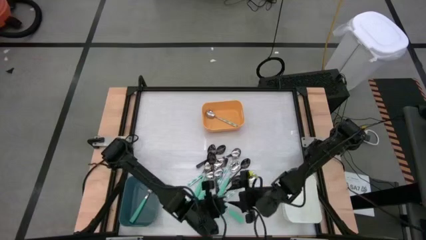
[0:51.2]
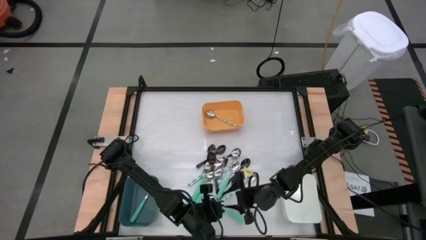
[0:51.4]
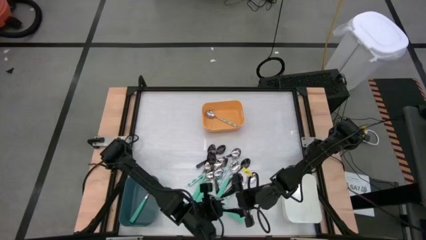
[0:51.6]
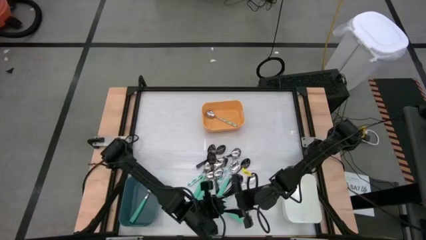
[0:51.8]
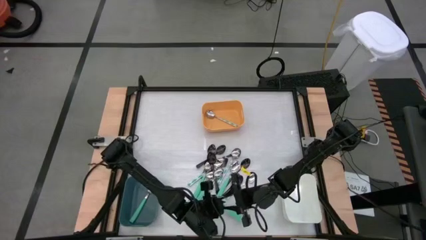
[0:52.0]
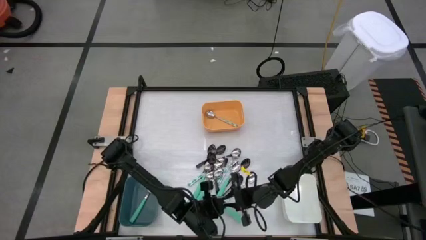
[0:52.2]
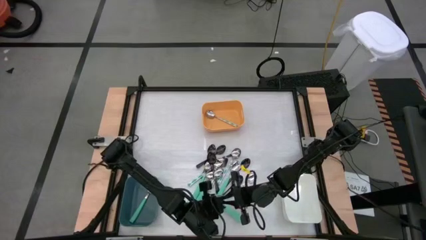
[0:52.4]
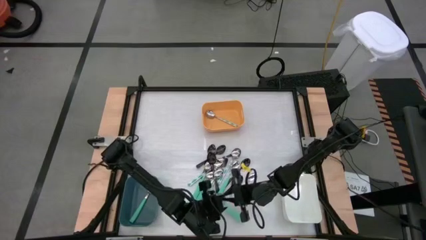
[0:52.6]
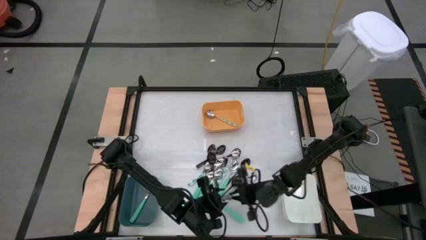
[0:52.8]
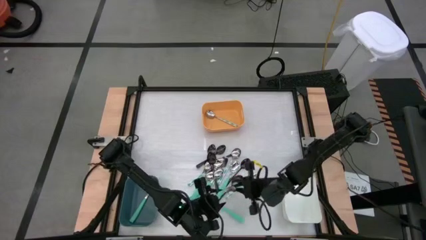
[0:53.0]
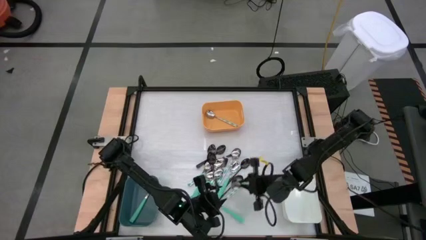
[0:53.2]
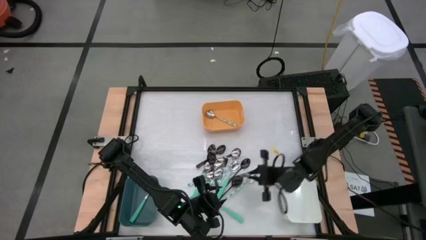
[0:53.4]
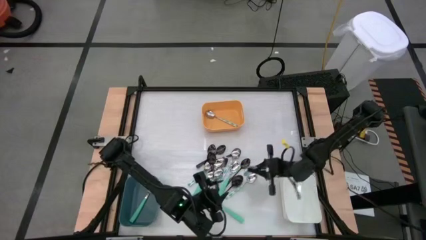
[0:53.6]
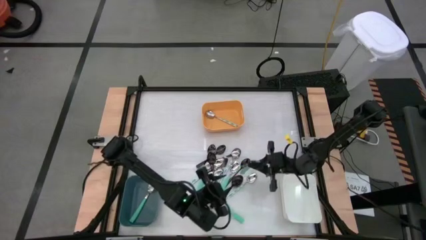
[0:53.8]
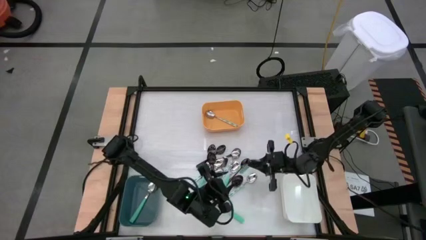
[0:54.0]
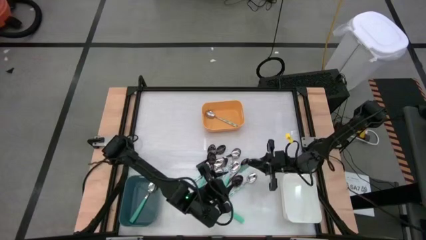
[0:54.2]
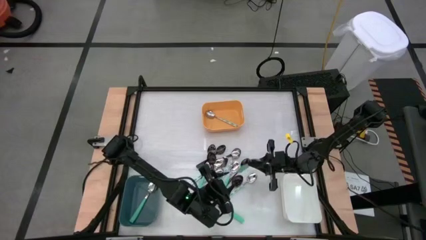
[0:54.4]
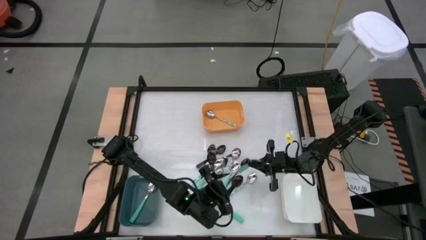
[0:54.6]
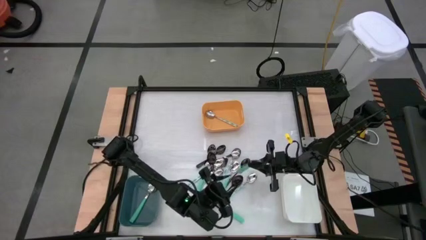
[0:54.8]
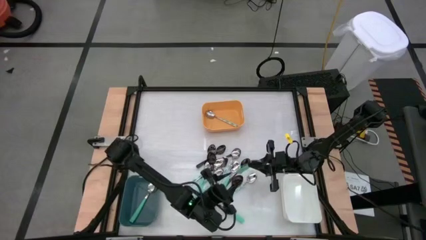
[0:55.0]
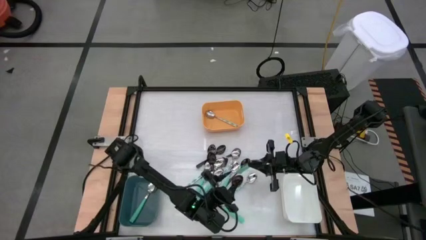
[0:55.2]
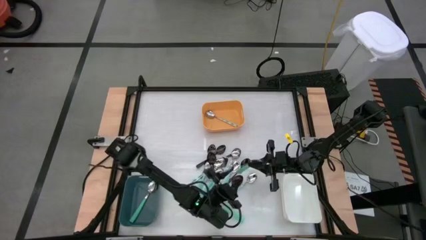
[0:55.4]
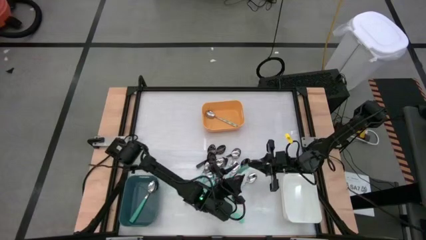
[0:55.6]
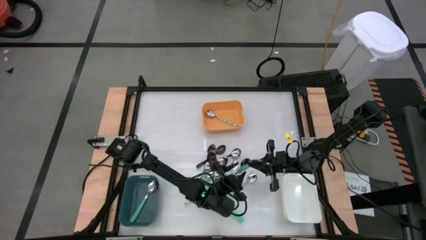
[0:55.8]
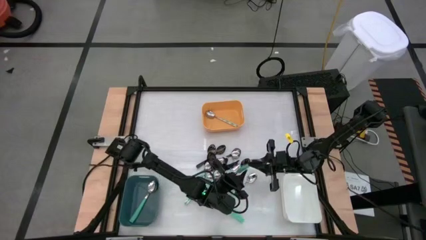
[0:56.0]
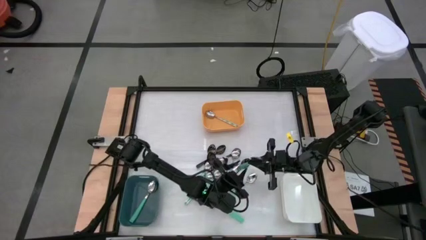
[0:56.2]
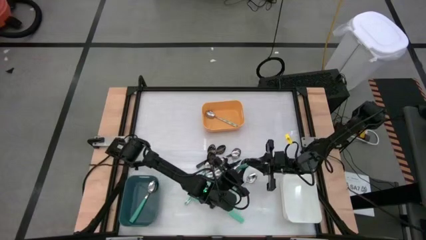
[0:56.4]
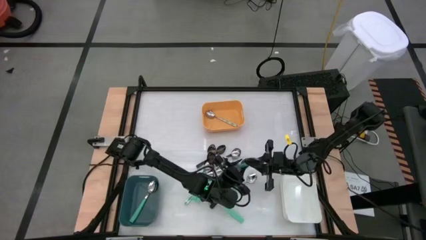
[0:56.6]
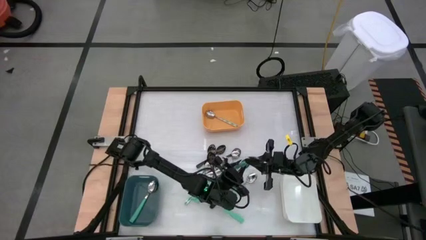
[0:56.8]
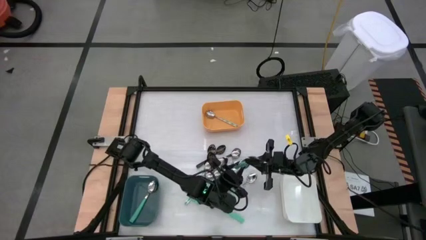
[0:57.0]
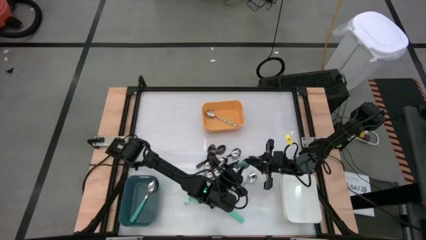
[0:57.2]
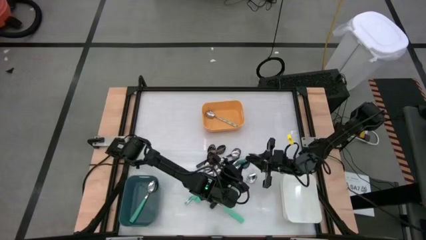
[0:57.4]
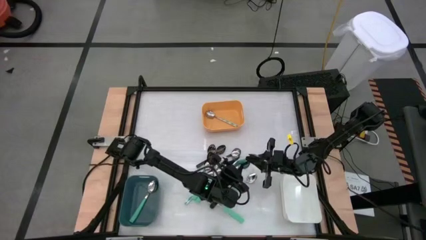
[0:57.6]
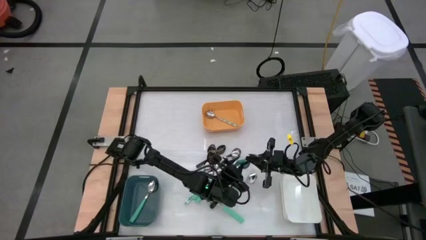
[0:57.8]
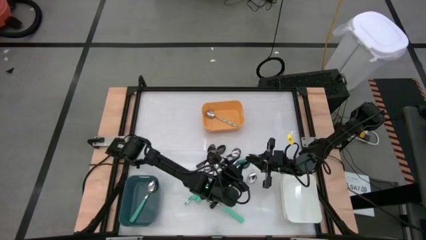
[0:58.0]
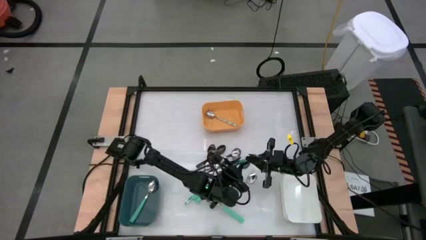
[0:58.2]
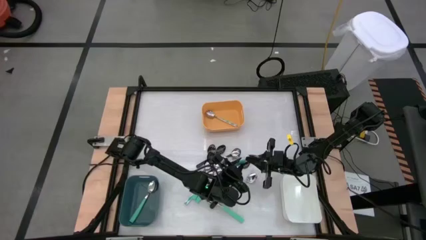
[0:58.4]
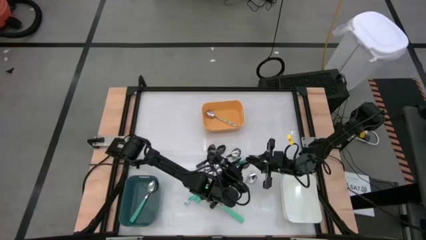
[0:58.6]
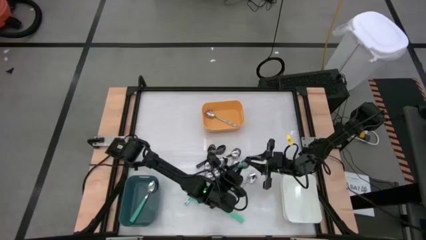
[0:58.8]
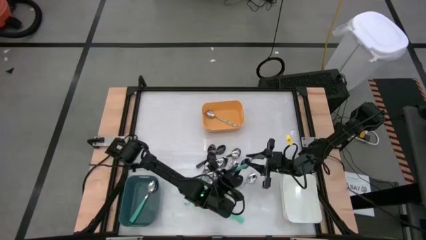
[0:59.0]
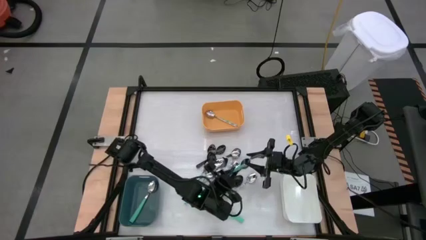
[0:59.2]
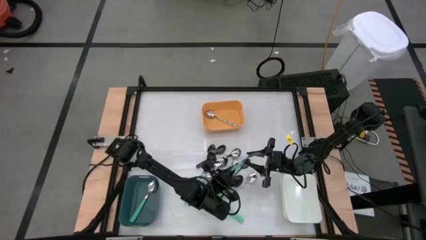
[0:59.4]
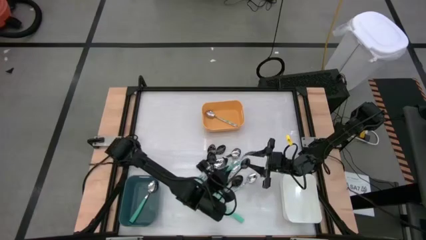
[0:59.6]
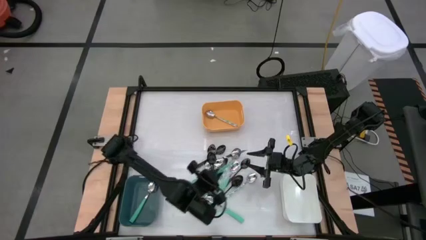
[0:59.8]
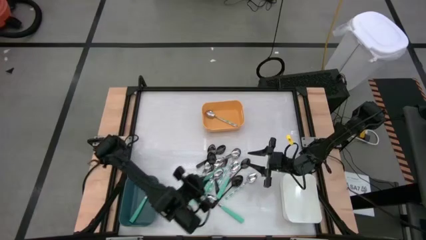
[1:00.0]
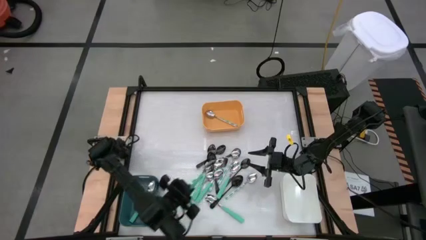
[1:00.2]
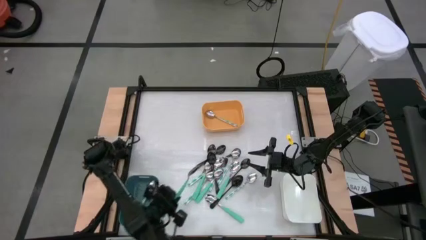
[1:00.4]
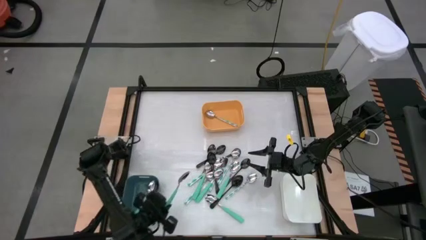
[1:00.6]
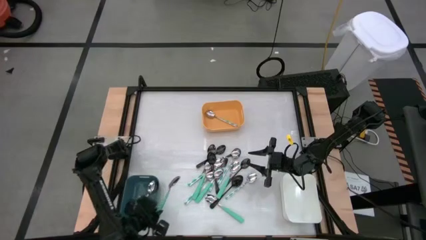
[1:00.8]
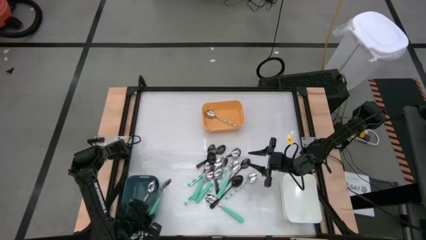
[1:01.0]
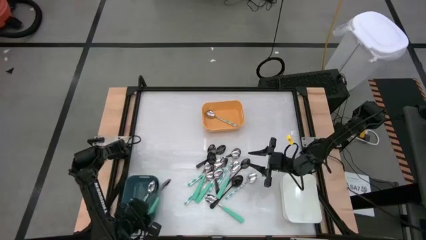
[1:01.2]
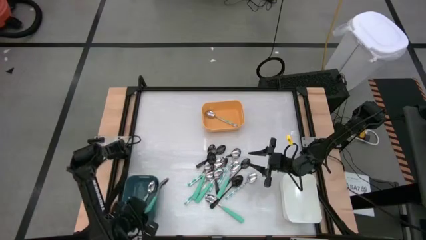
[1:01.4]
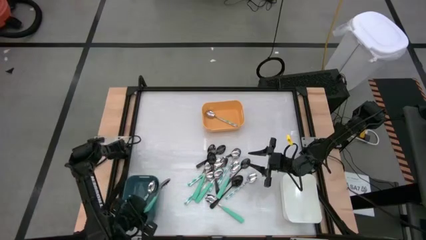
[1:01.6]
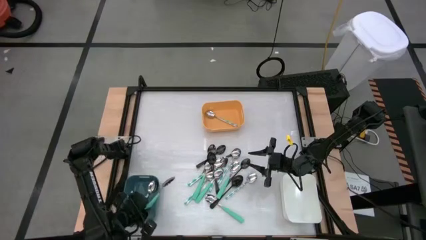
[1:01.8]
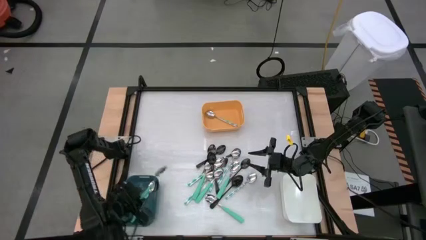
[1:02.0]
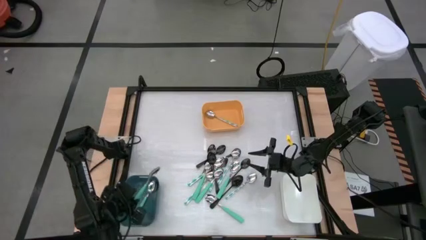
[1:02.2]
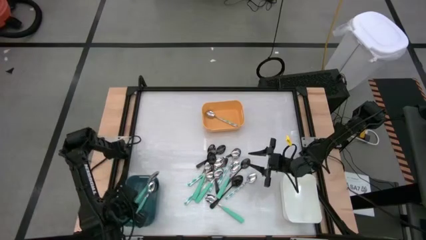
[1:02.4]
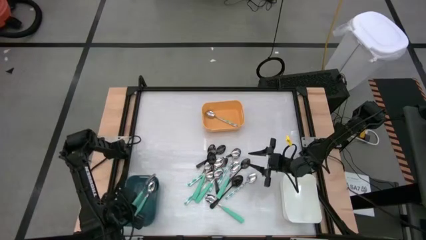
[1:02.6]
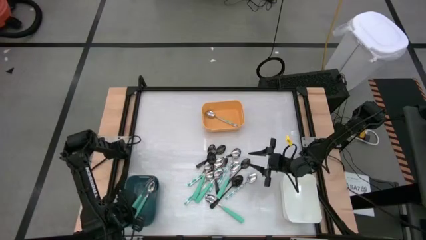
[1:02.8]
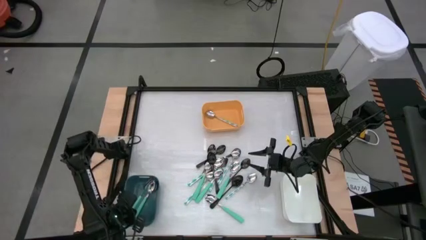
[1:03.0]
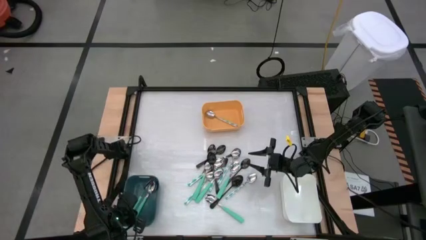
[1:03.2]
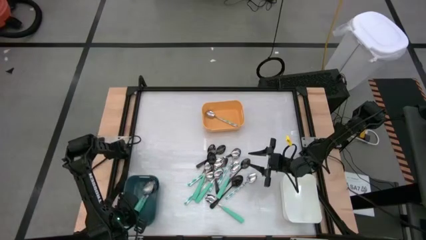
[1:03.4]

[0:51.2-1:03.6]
Task: Sort silverware by color (type)
Put the green spoon into the blue bin
